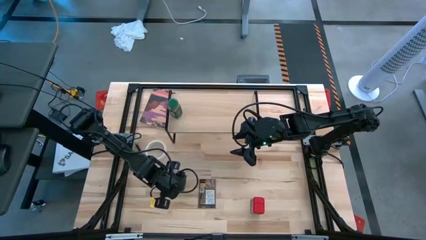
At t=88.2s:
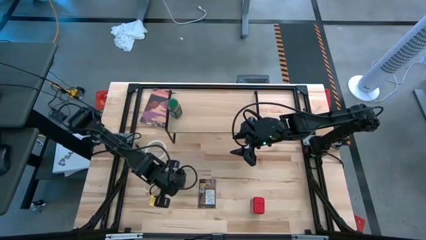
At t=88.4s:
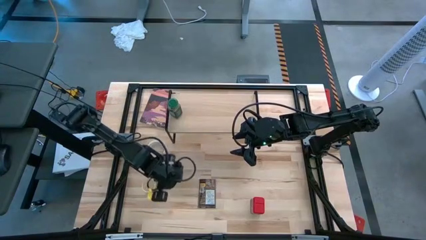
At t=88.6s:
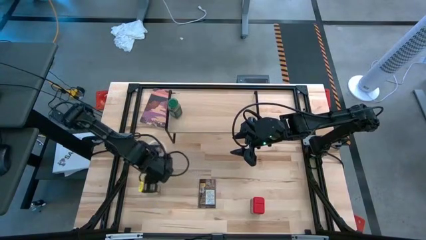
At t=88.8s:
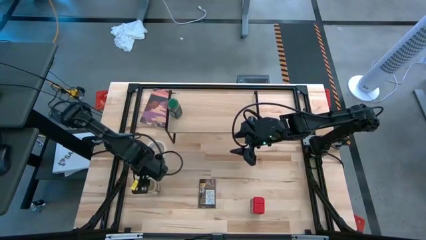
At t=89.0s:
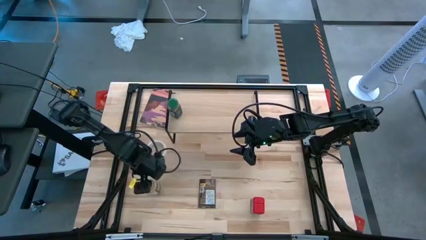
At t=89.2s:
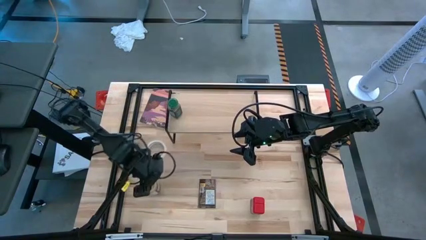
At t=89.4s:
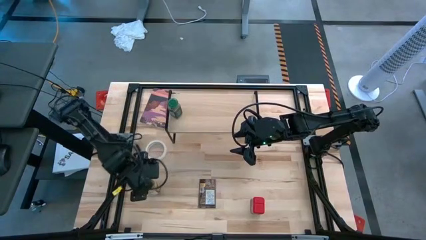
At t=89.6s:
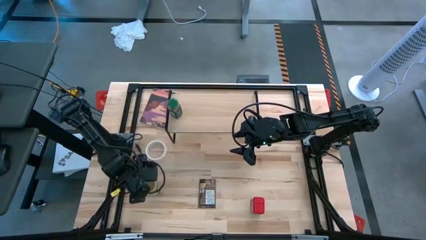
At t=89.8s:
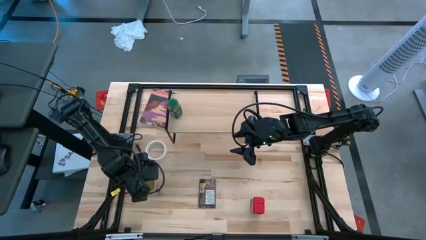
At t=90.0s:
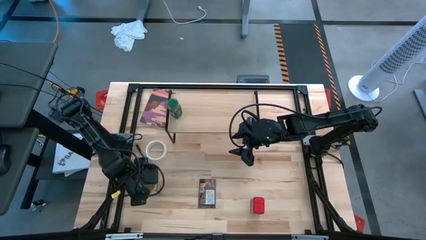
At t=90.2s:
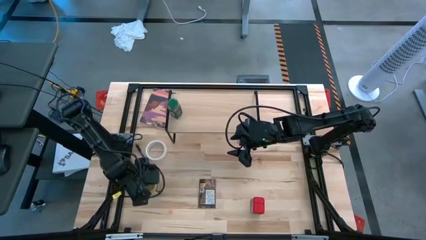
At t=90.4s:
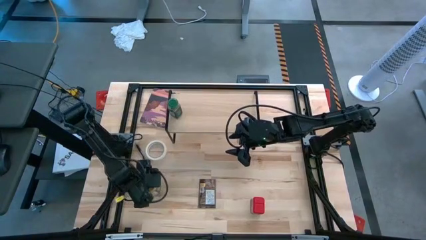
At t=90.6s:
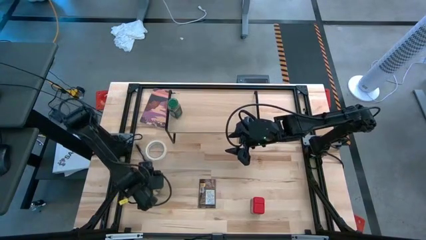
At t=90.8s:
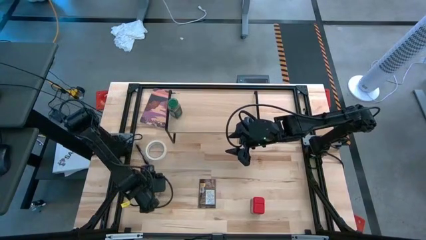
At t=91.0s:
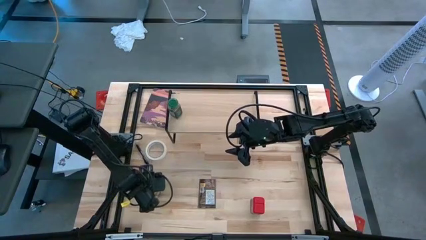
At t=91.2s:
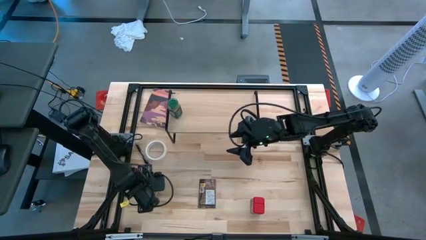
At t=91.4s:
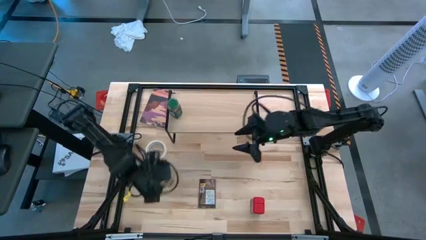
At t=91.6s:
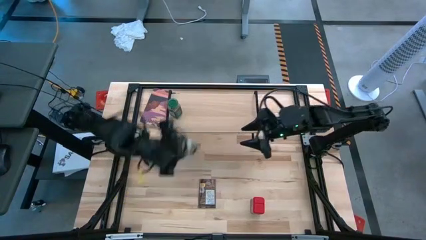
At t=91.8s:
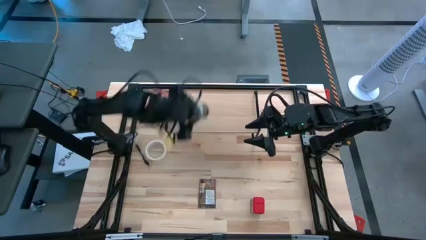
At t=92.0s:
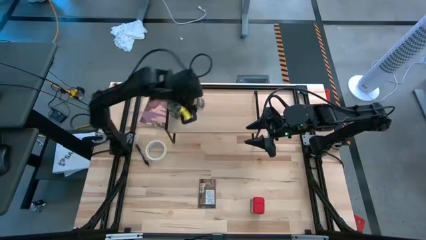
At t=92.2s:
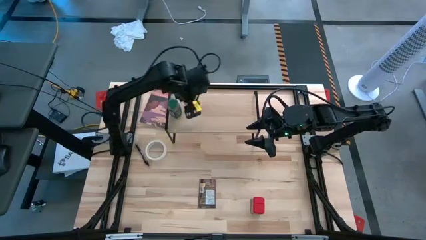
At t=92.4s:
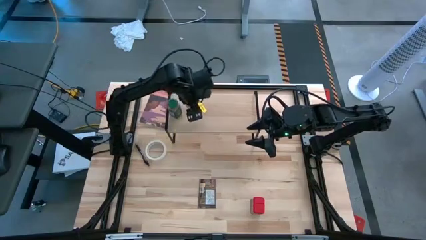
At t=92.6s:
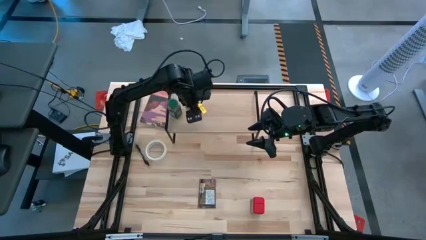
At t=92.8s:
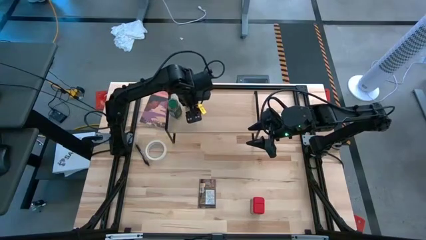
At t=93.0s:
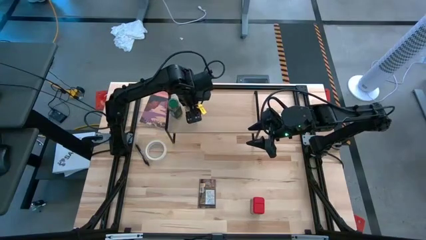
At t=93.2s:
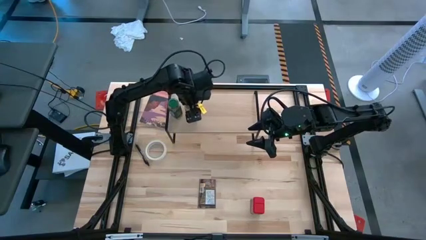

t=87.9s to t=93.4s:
Task: Shelf spices
Put the brown seasoning bottle on the shelf

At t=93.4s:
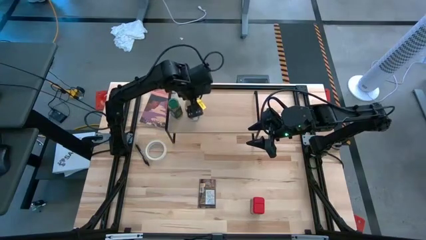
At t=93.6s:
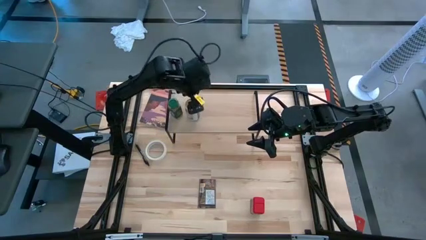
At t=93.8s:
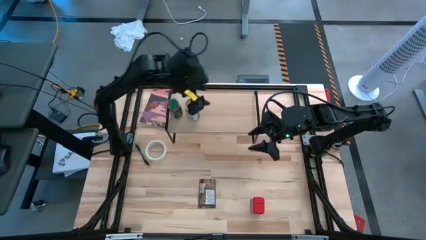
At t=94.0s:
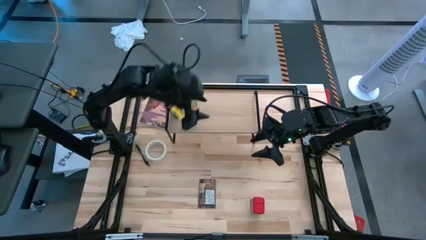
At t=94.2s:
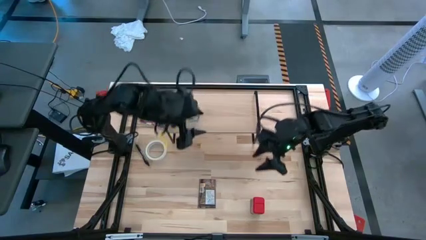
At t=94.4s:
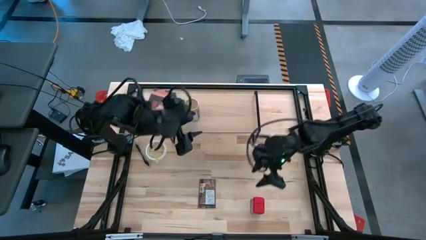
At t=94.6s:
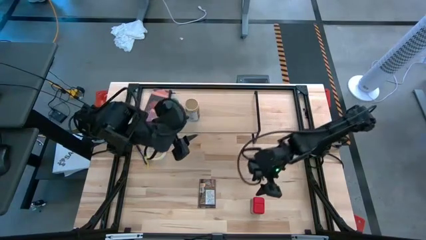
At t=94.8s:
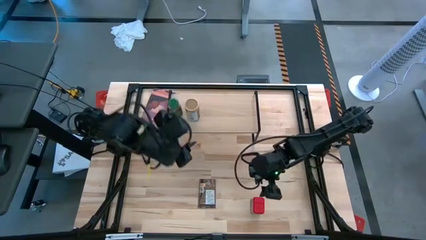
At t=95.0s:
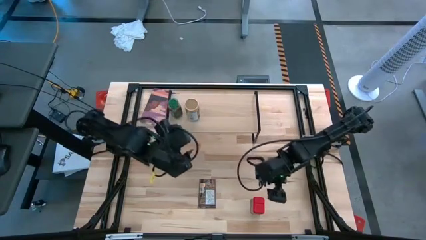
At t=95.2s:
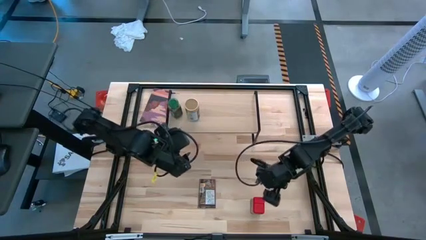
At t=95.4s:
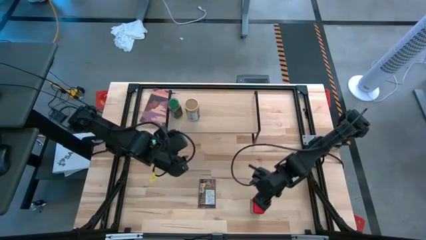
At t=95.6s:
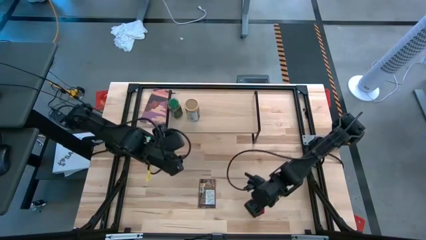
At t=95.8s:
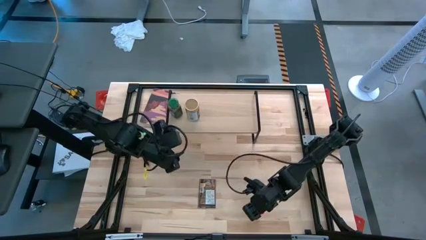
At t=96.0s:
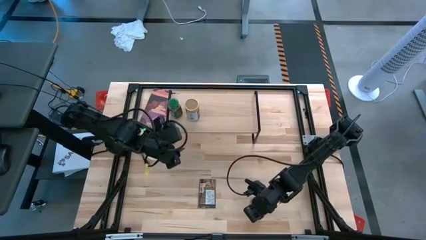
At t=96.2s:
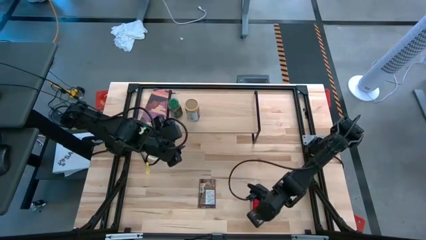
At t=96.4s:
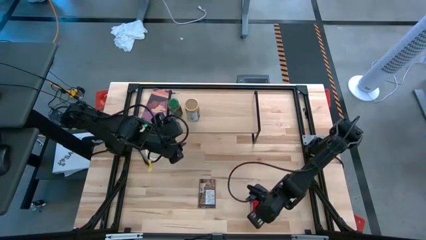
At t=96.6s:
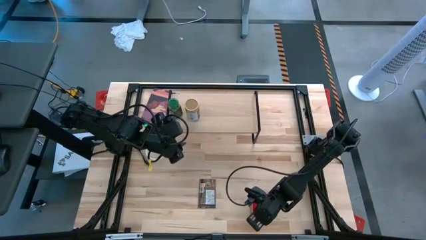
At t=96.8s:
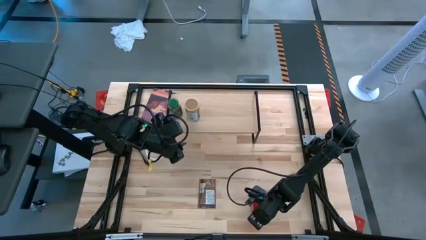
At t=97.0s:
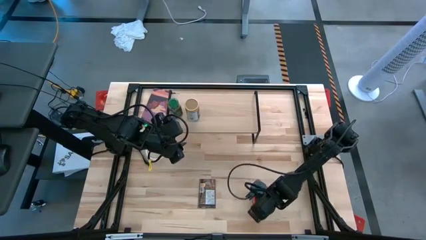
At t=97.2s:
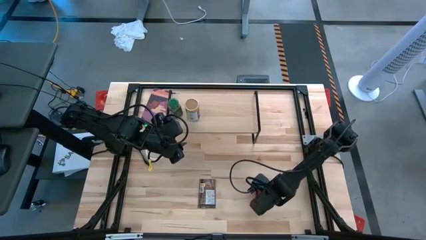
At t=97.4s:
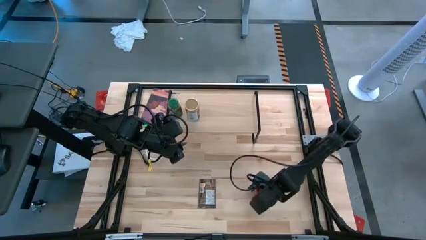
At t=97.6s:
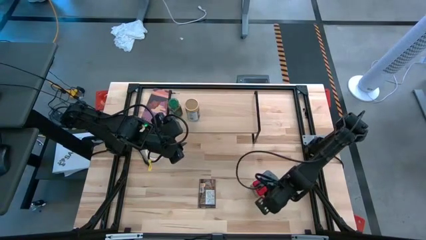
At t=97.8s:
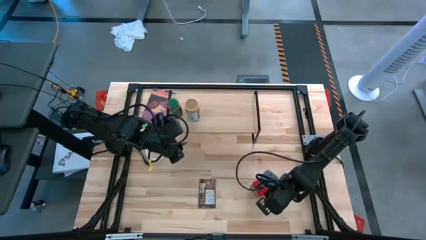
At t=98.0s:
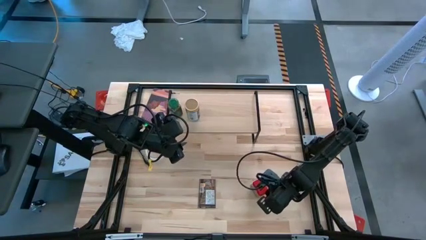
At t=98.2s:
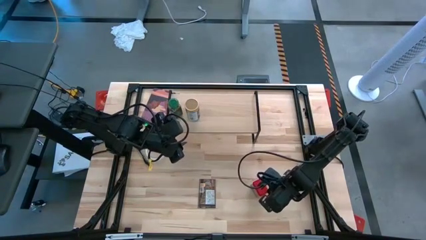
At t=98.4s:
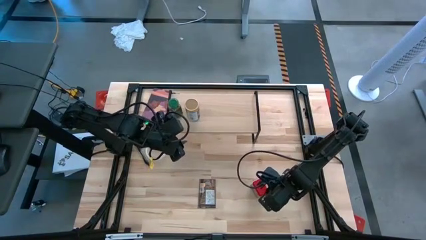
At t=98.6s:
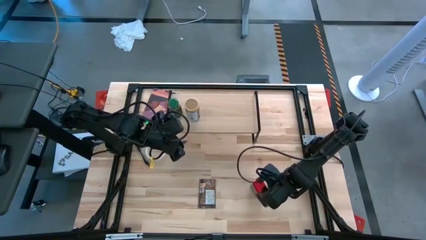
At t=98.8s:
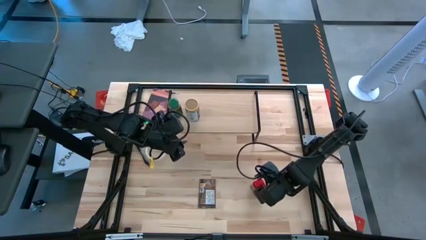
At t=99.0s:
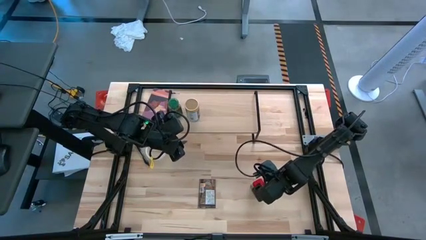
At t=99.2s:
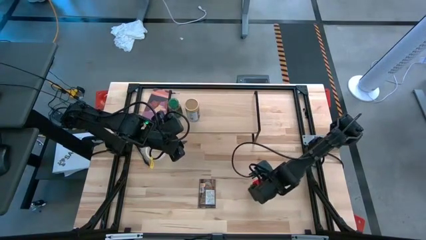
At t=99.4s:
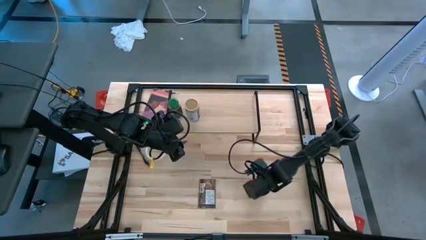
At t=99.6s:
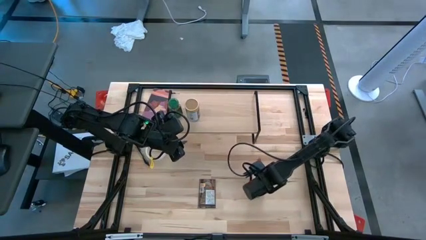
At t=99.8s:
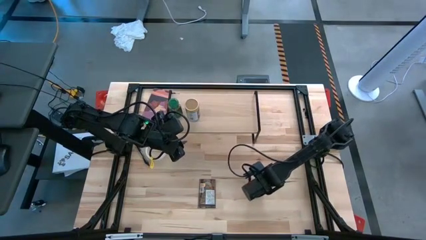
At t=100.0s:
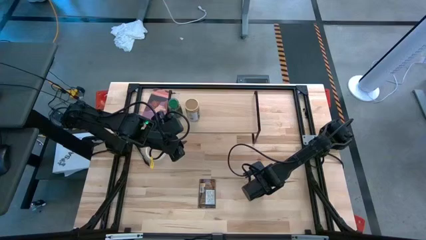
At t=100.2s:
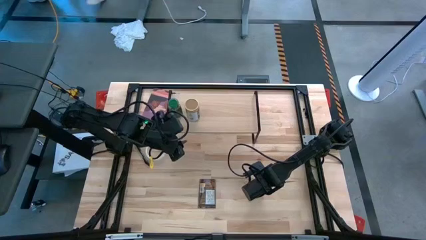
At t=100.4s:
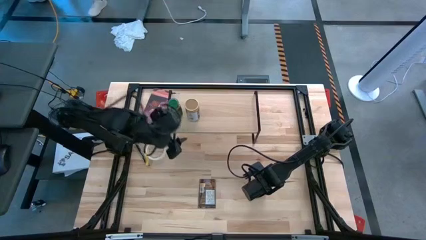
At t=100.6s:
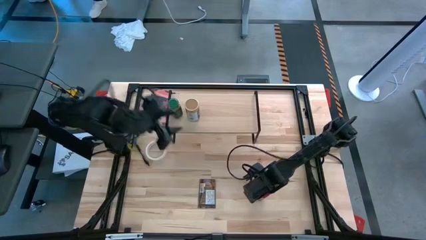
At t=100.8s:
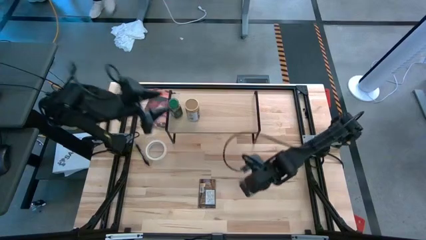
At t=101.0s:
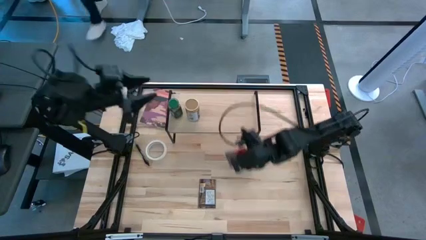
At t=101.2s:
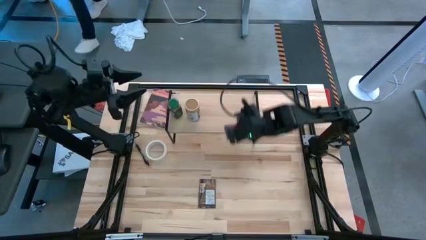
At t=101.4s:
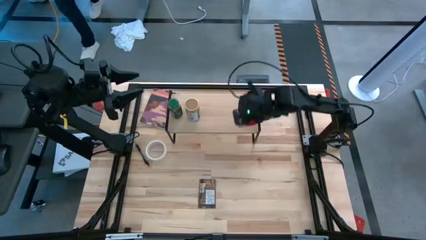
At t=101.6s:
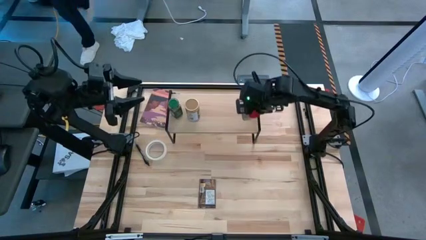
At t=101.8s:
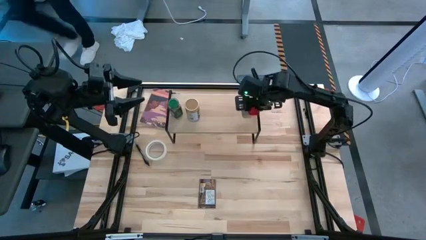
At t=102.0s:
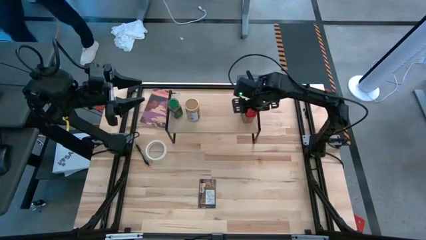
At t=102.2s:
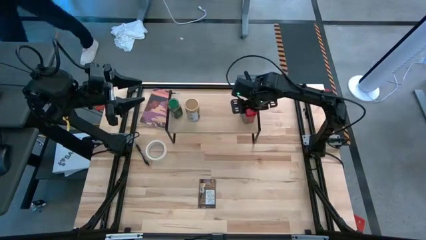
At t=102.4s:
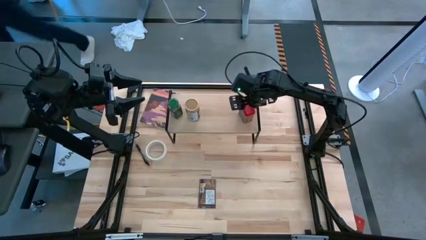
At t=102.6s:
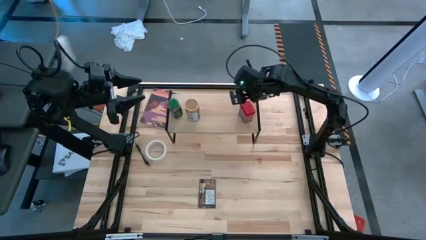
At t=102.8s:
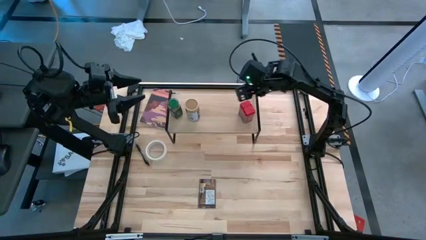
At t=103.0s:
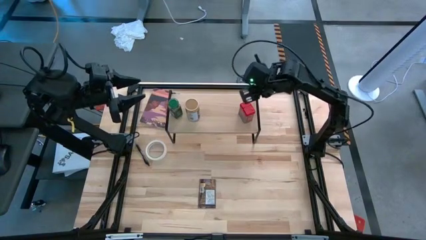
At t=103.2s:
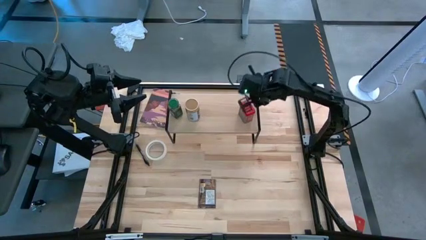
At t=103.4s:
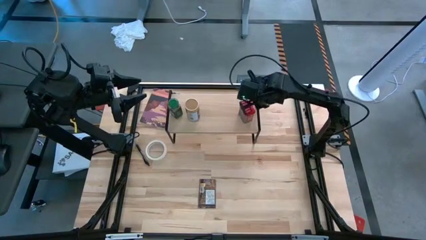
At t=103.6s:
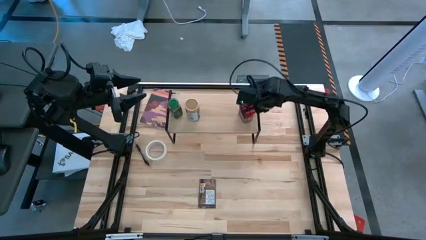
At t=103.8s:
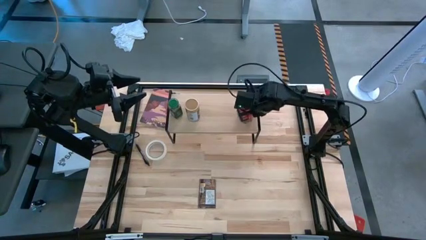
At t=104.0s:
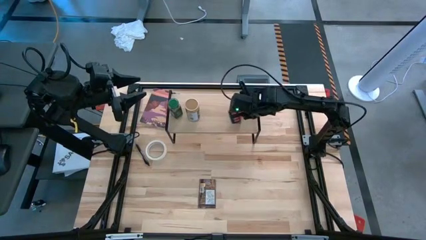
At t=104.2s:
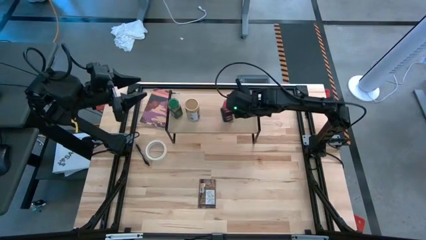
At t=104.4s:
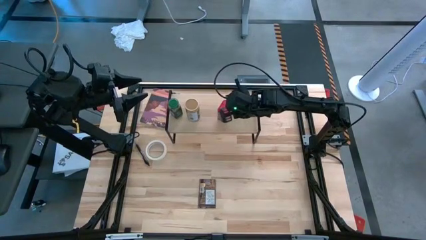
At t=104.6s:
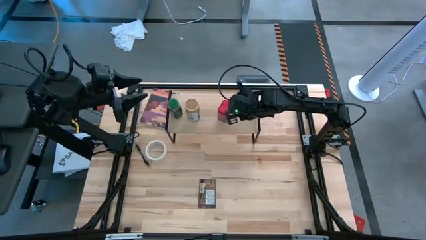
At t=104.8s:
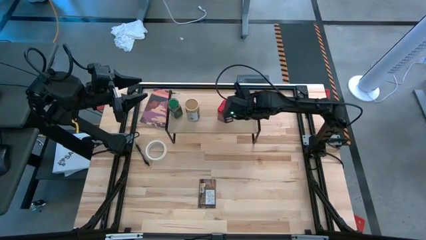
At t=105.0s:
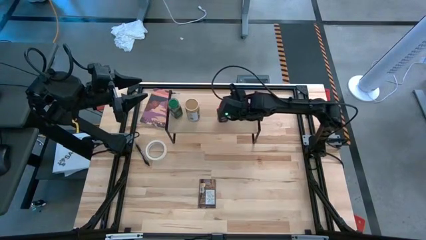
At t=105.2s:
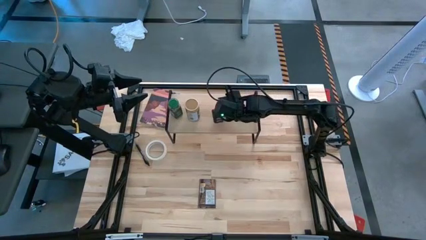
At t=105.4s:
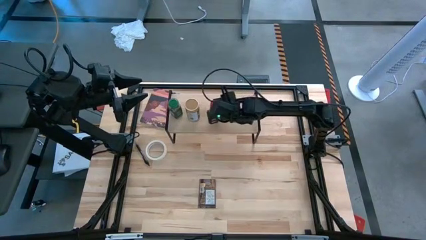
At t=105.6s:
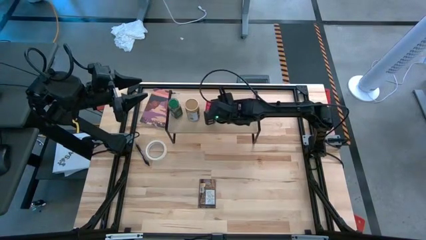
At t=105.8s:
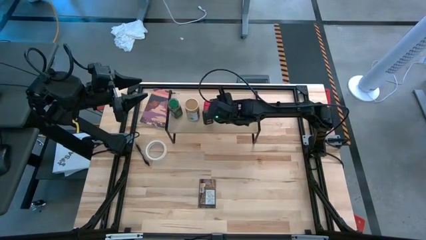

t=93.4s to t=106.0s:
Put the red seasoning can on the shelf
